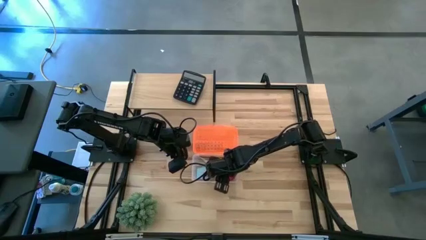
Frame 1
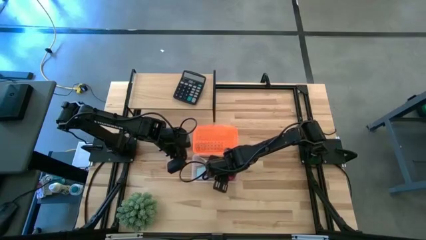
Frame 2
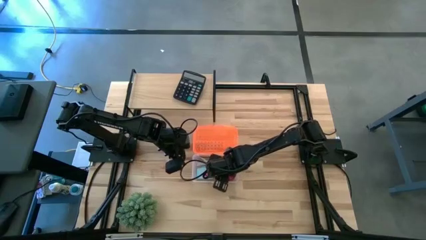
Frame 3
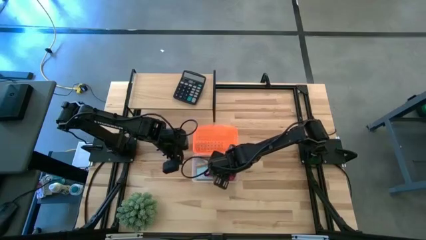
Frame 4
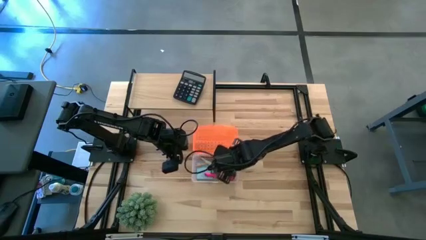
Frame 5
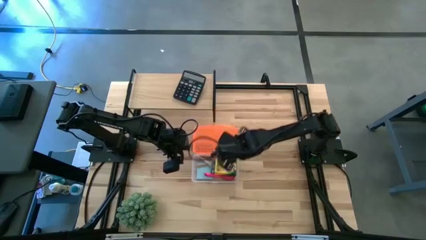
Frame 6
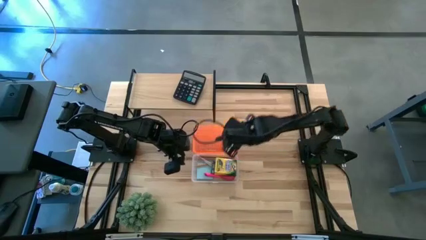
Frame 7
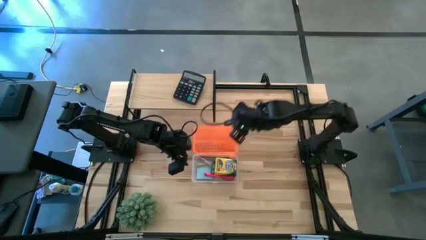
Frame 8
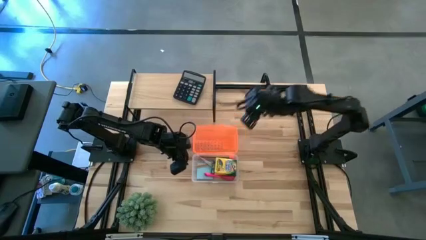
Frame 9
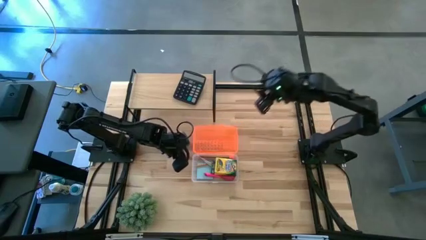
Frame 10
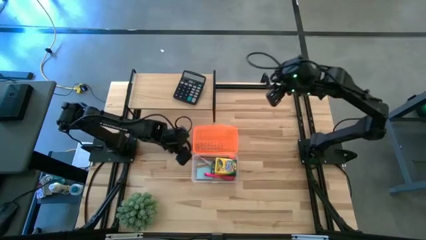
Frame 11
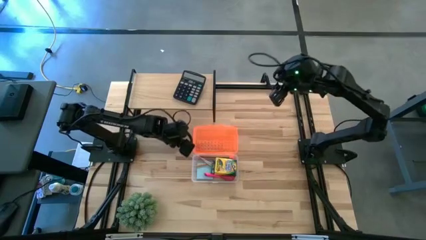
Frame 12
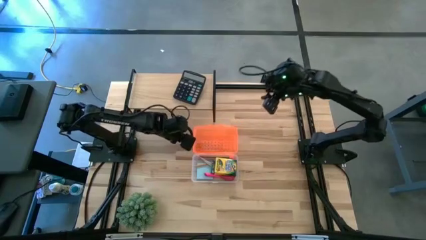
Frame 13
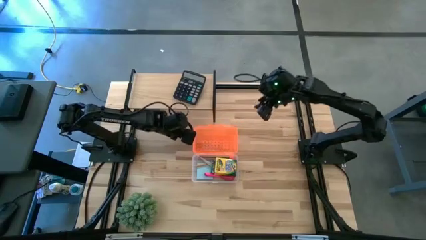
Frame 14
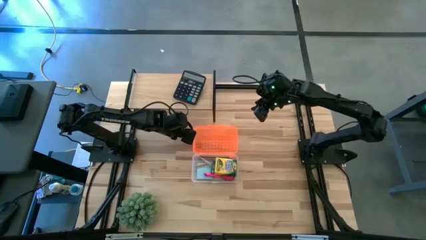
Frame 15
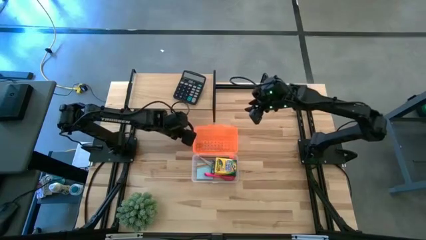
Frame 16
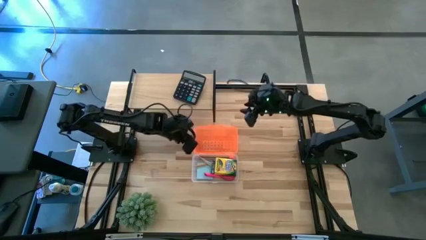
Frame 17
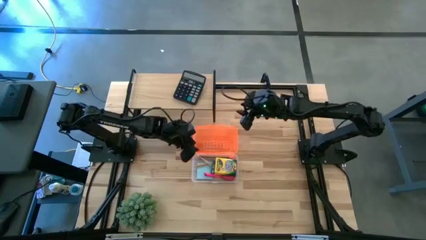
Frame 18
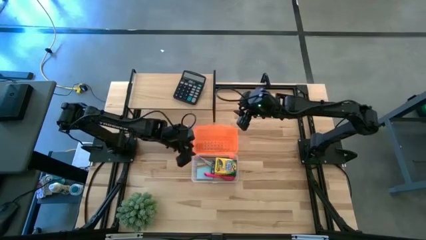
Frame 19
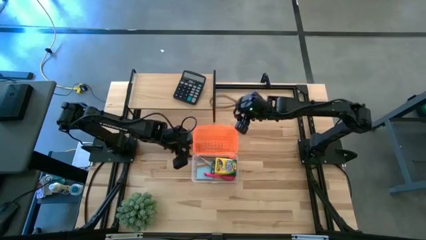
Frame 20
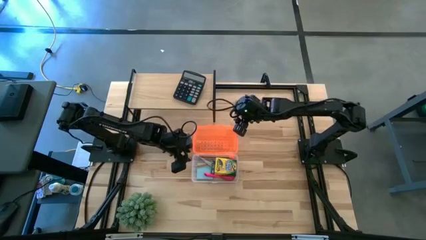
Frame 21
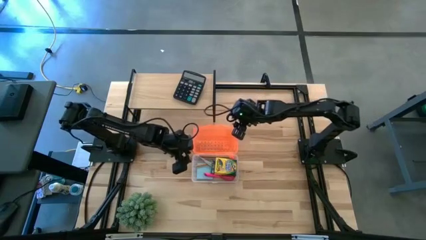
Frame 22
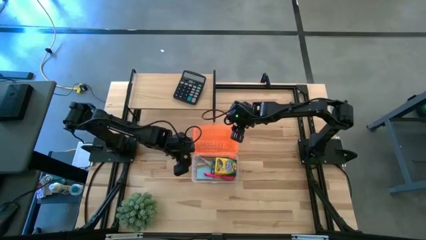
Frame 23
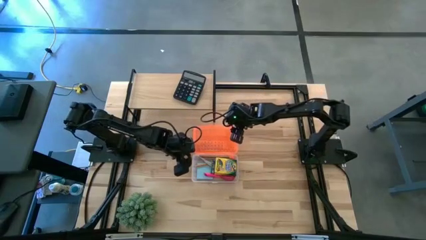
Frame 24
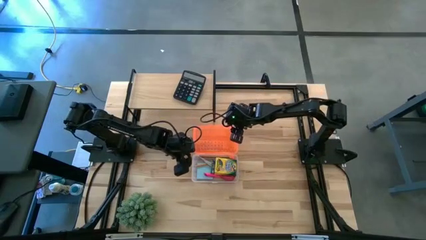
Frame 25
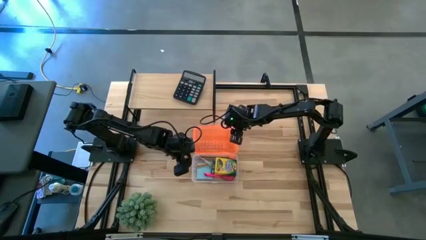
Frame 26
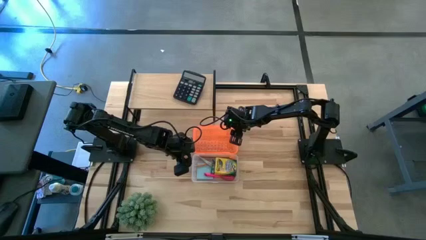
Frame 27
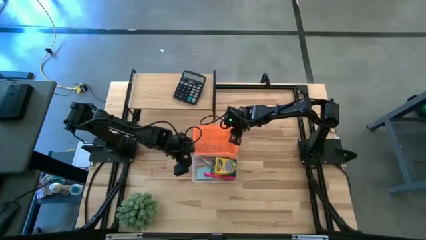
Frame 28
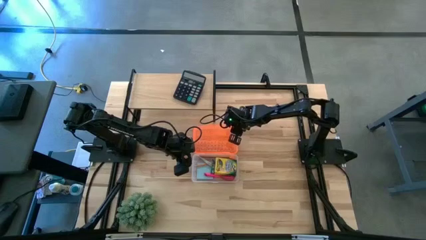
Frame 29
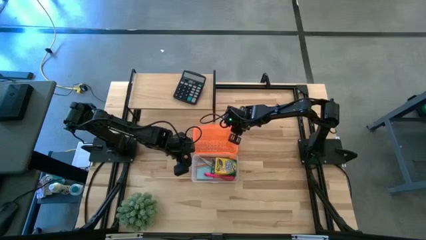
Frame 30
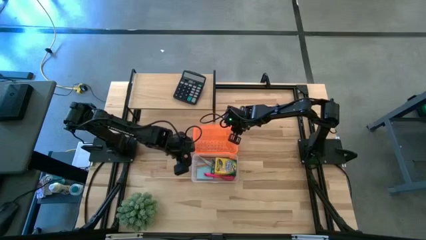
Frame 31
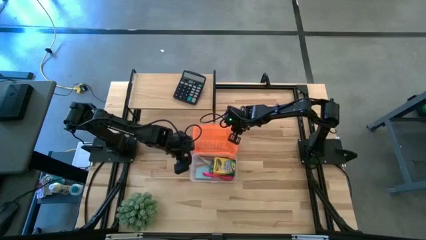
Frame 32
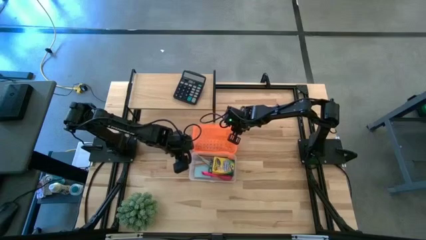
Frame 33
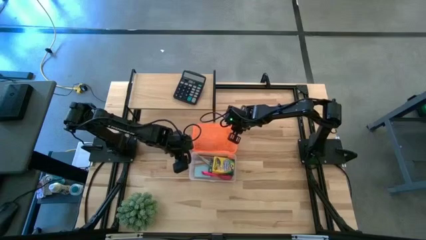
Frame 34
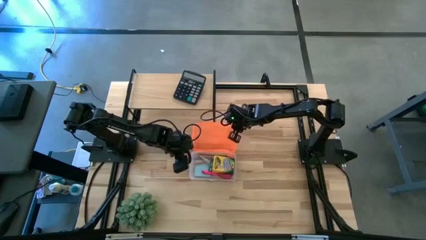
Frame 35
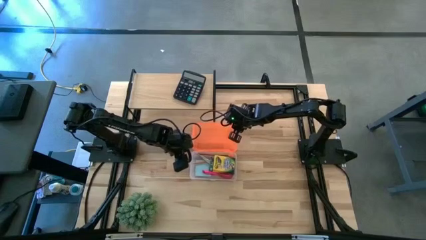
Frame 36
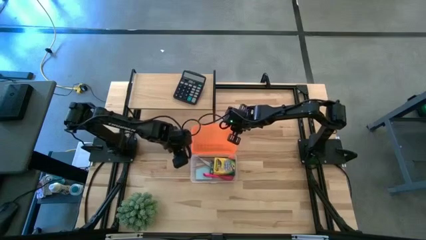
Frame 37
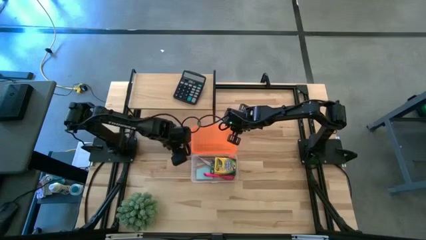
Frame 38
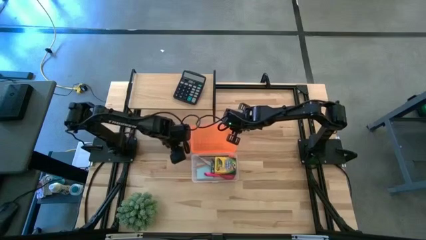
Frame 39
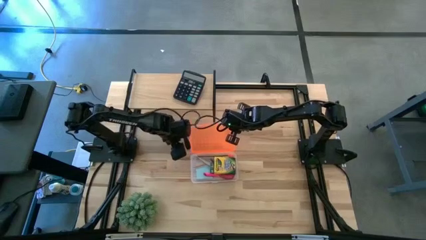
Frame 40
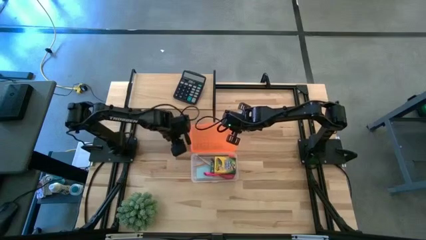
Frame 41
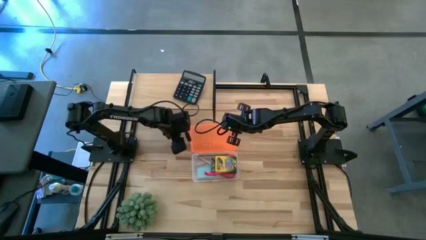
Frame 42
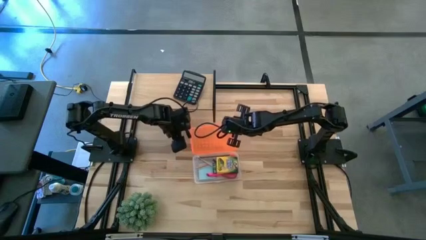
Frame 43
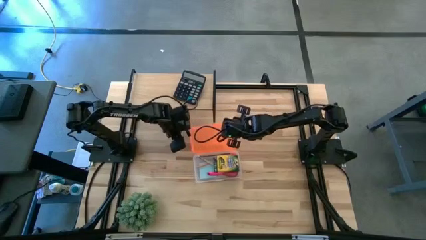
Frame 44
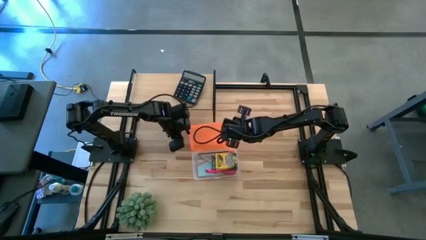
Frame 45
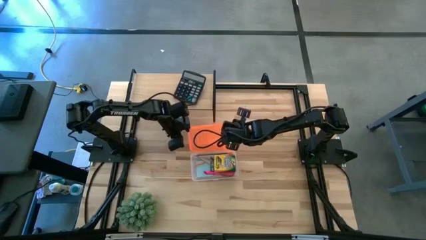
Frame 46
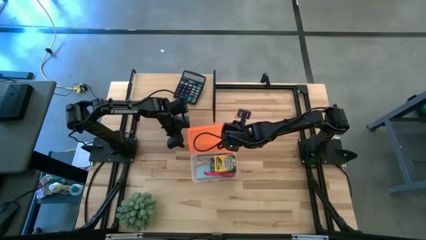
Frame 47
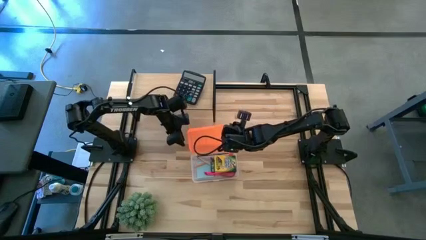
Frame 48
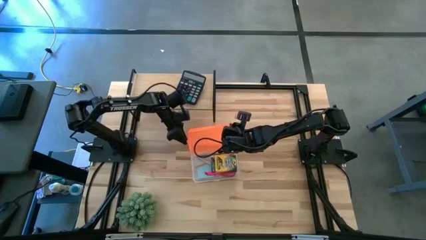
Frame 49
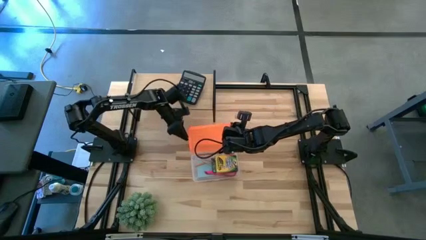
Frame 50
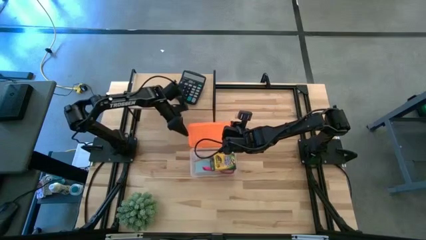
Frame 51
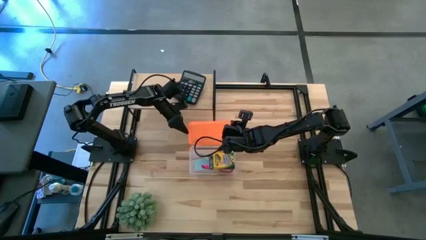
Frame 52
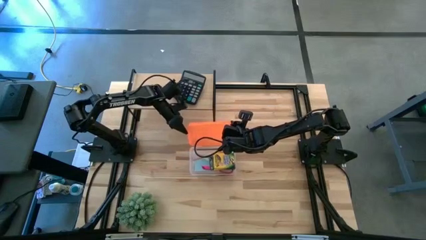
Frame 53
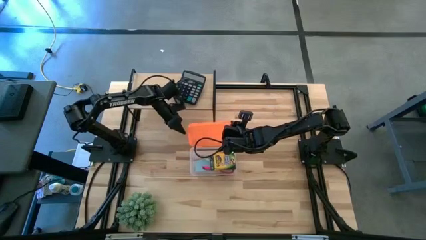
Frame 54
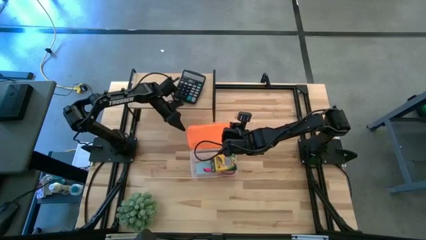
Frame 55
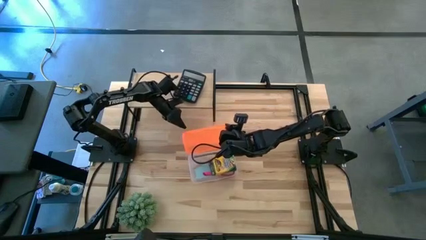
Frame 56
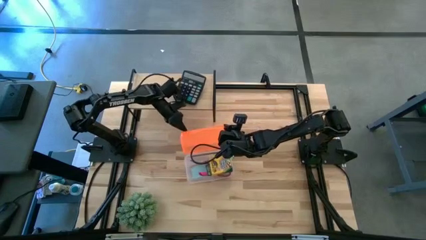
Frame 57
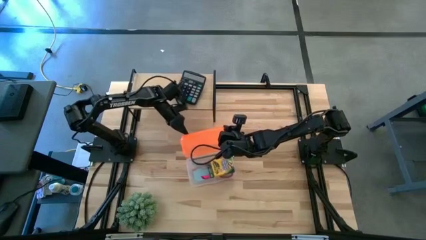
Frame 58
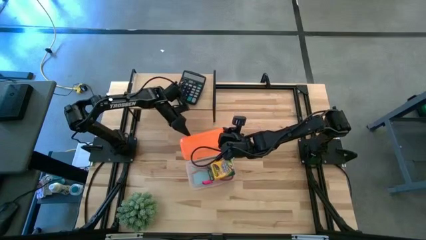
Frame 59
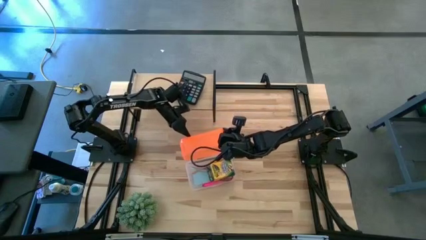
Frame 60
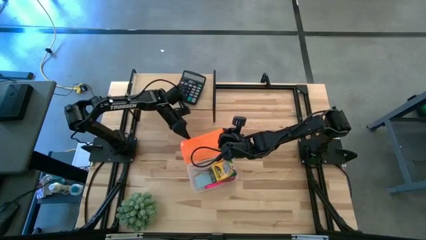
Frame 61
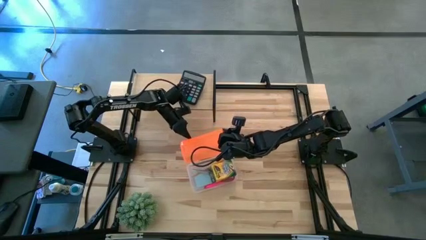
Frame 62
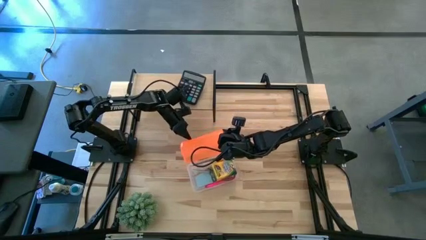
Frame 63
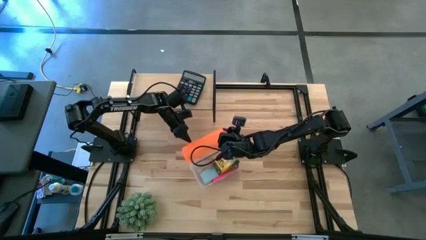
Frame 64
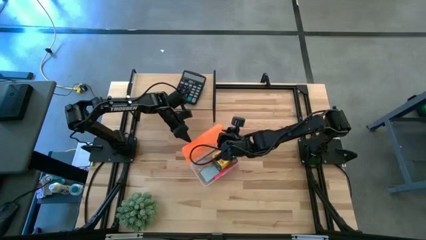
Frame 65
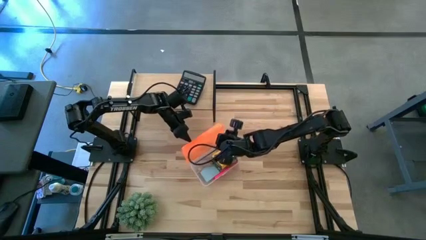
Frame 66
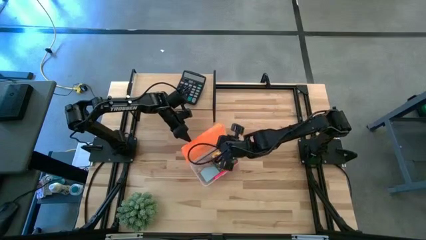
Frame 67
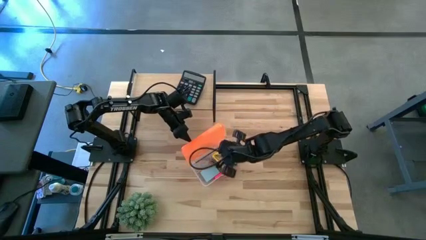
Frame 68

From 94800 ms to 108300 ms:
Task: Pack school essentials
Close the school supply box

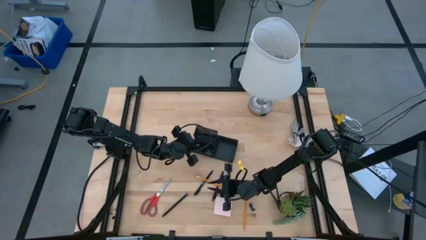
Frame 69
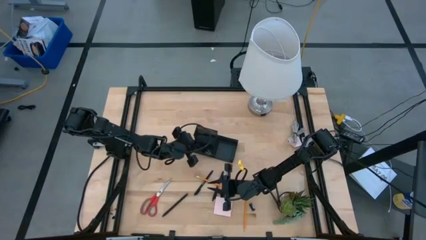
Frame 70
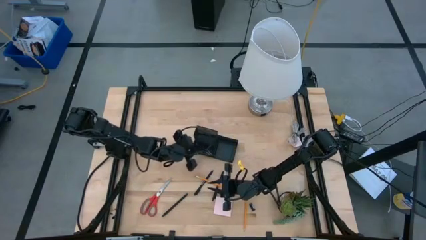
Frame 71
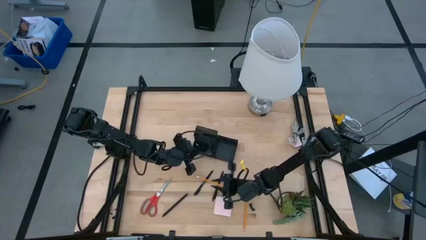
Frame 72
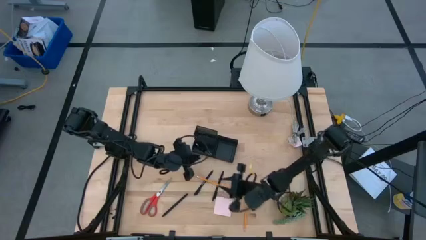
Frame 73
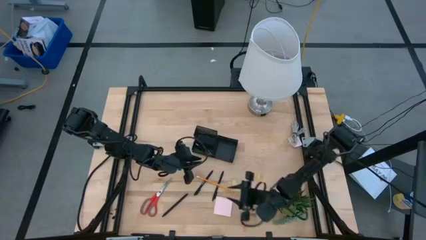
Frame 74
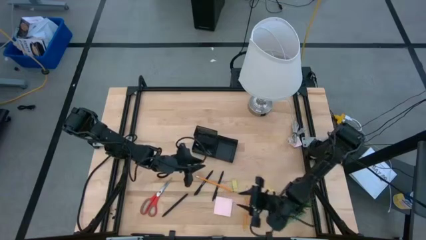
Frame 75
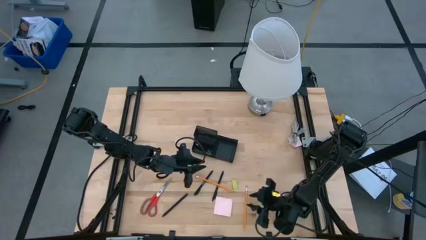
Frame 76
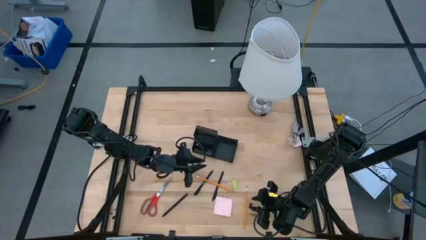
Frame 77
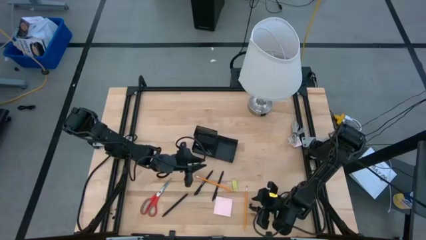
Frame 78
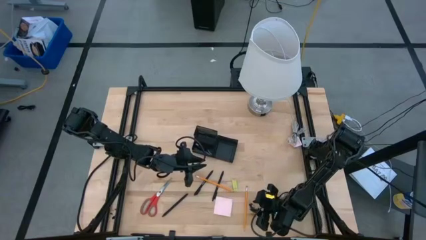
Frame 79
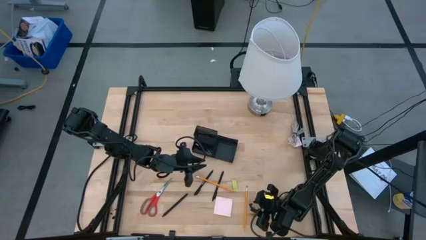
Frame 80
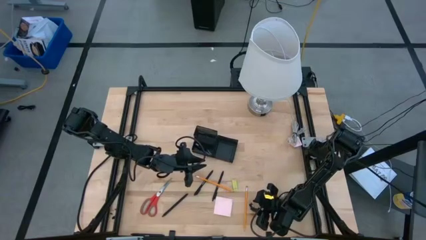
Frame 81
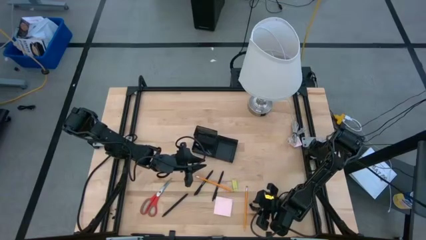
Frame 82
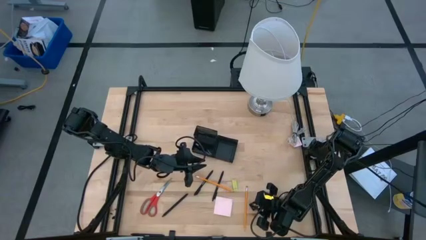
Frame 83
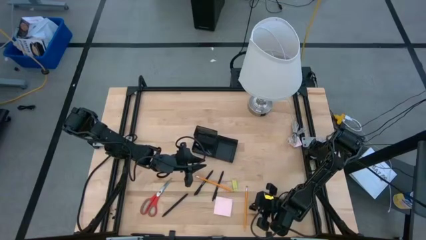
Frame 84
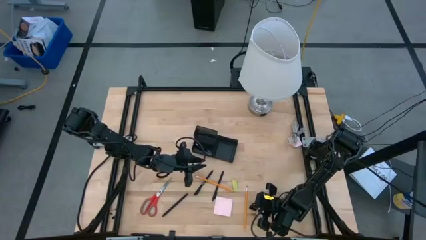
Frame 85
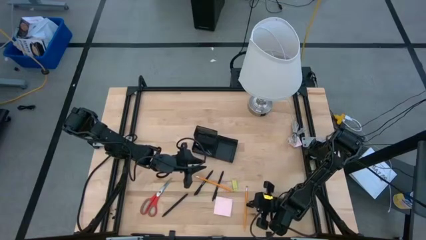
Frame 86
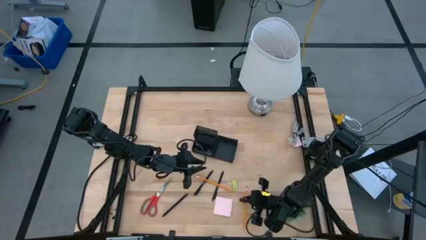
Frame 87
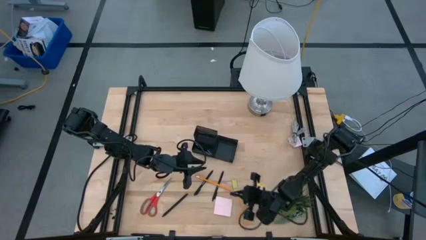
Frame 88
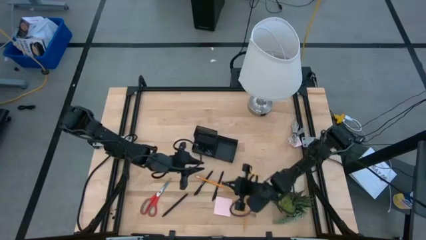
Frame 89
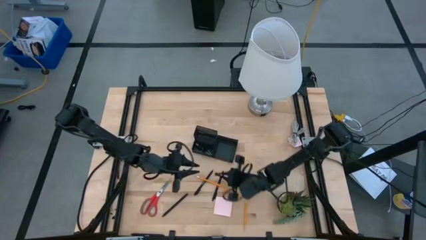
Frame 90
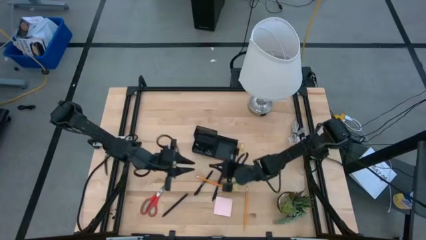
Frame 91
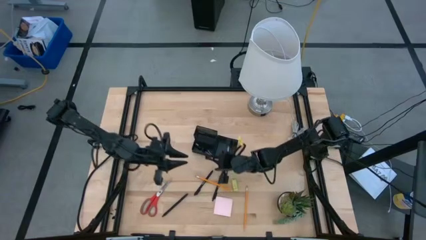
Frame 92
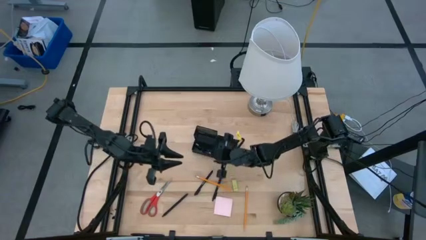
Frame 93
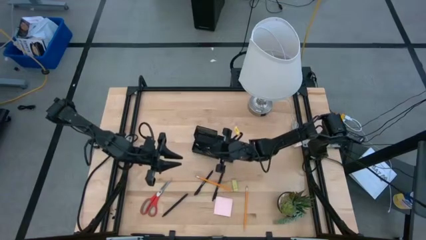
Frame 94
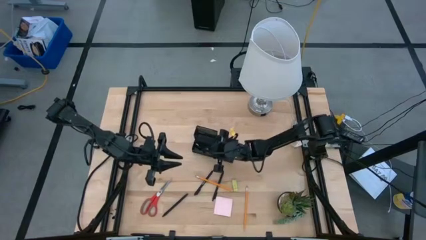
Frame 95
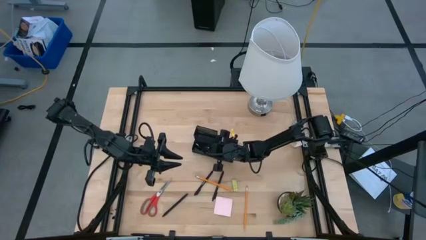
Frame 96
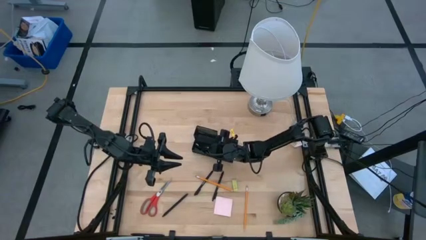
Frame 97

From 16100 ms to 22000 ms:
Task: Pick and place office supplies into organizer
Put the black binder clip into the black desk organizer
